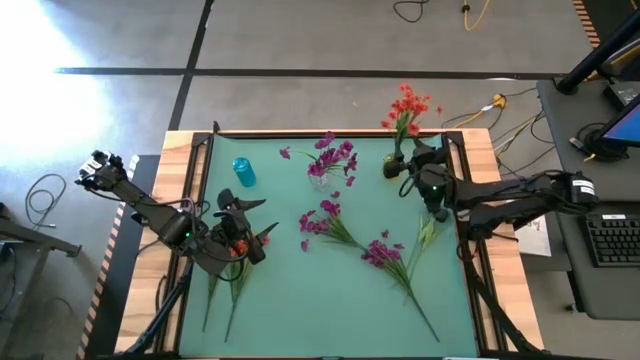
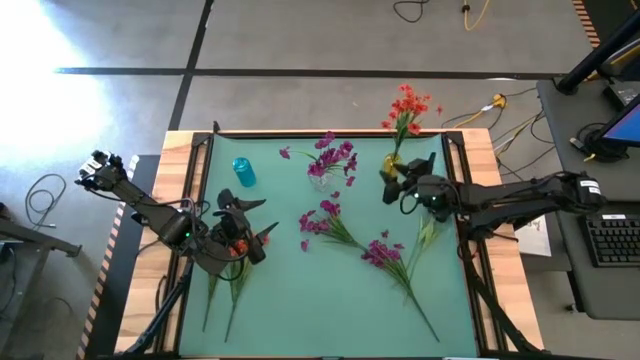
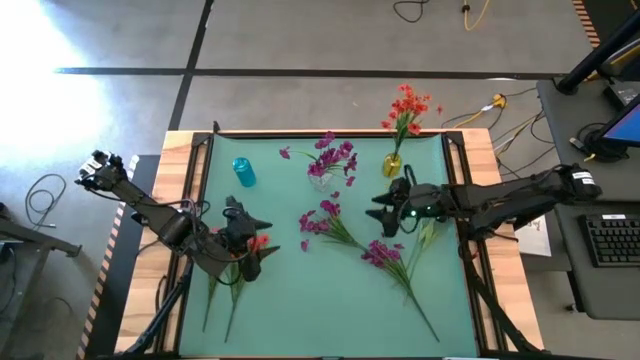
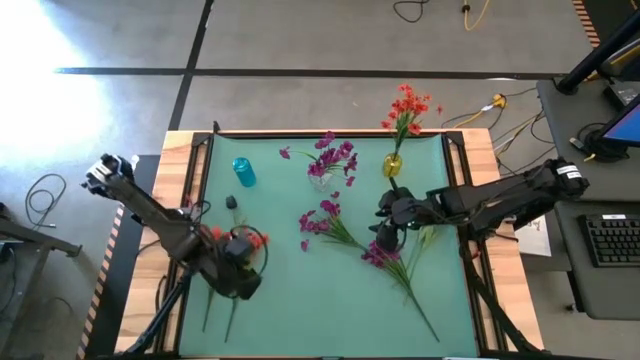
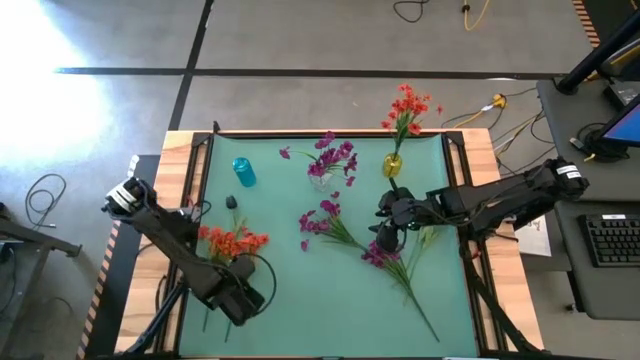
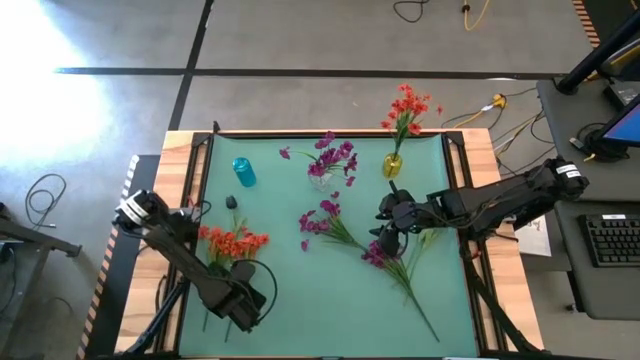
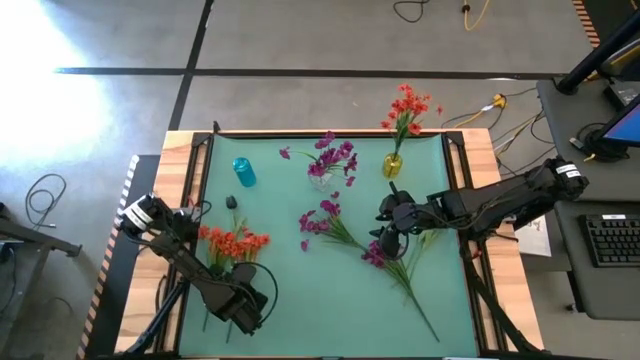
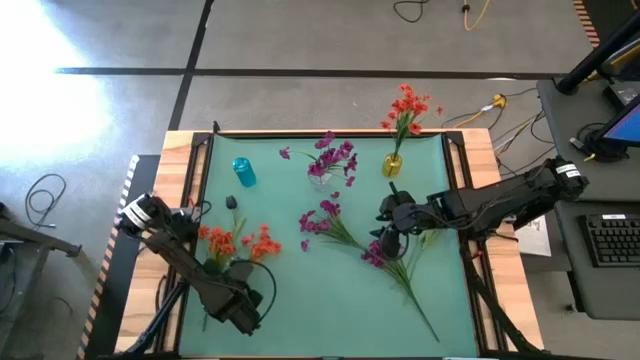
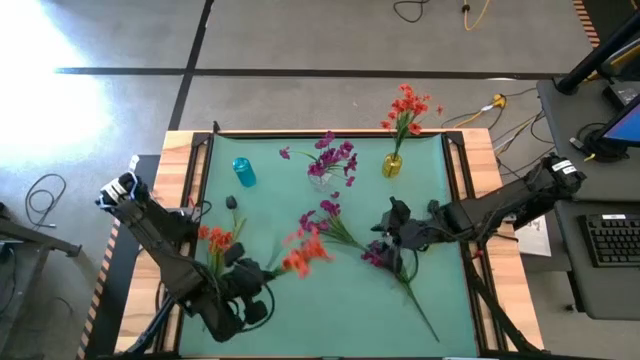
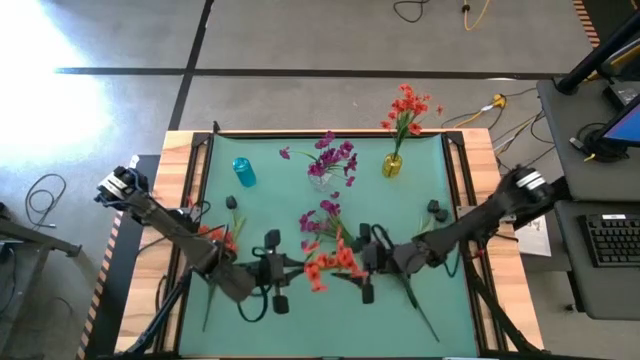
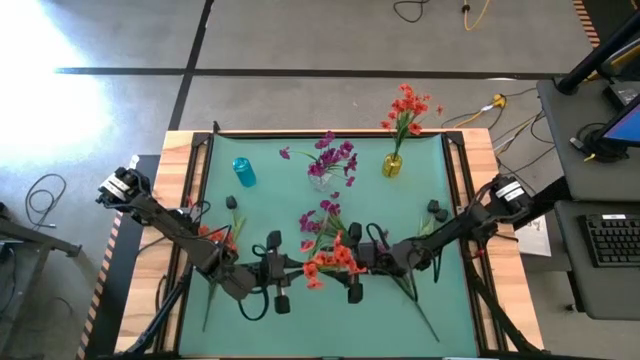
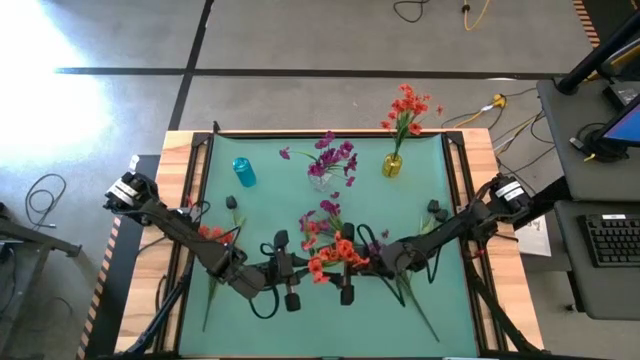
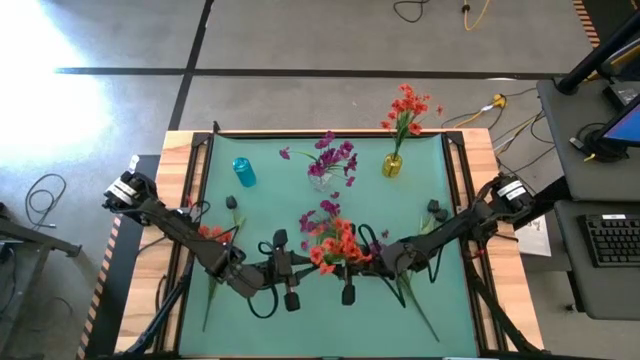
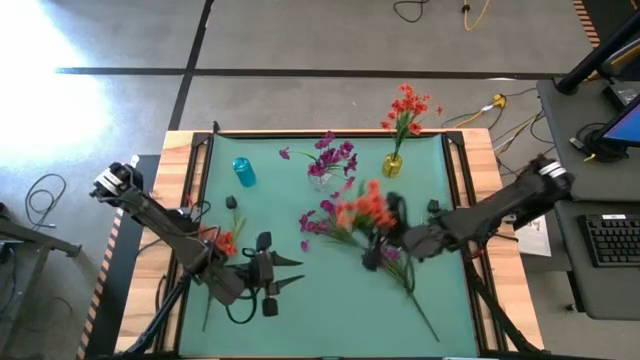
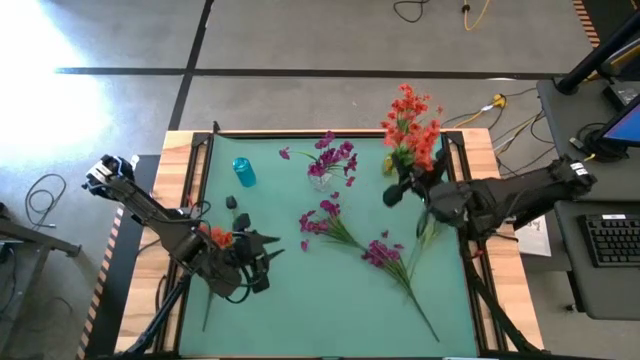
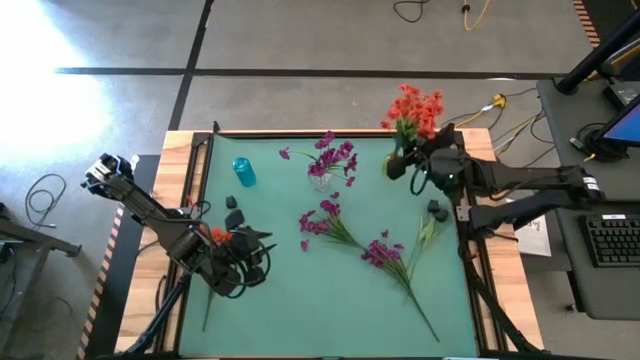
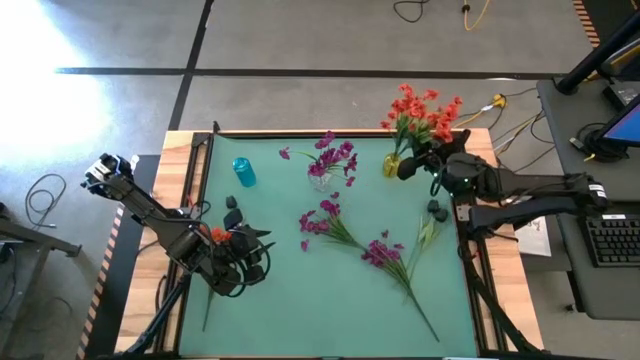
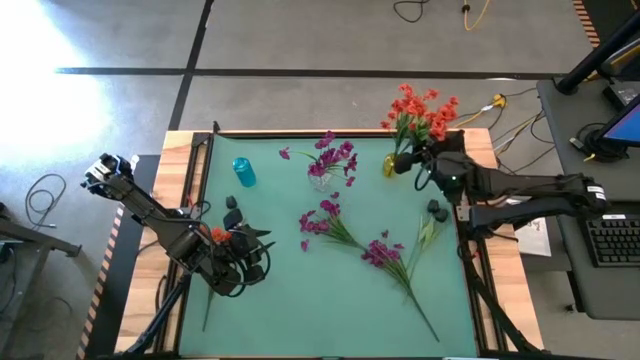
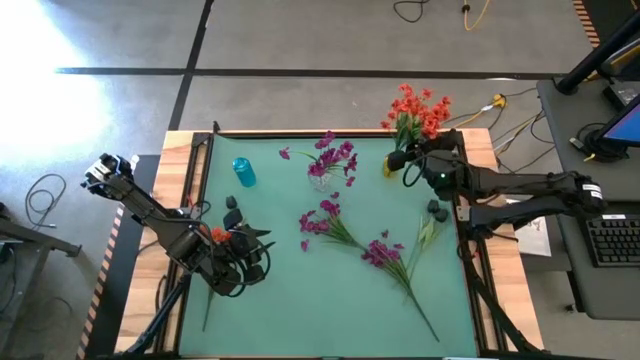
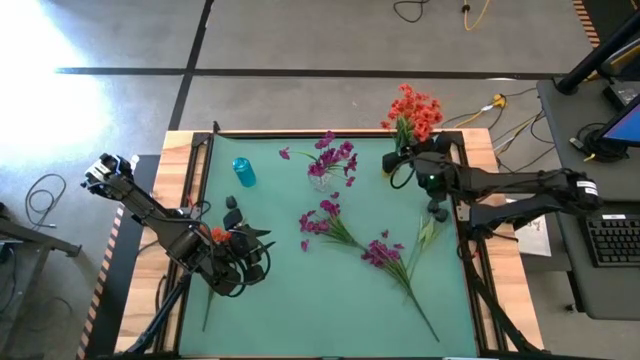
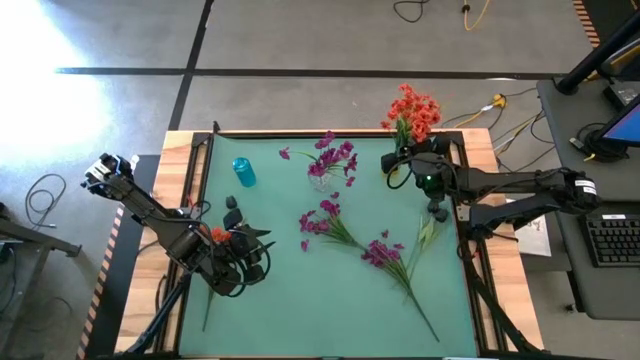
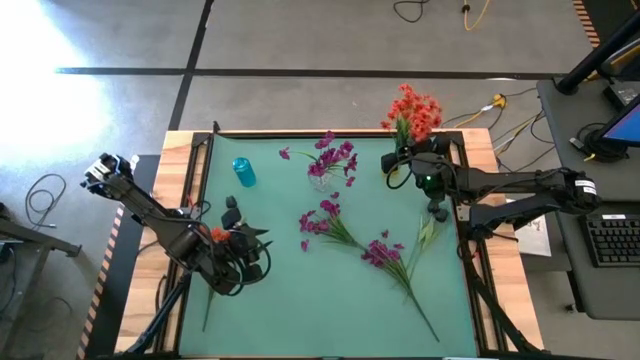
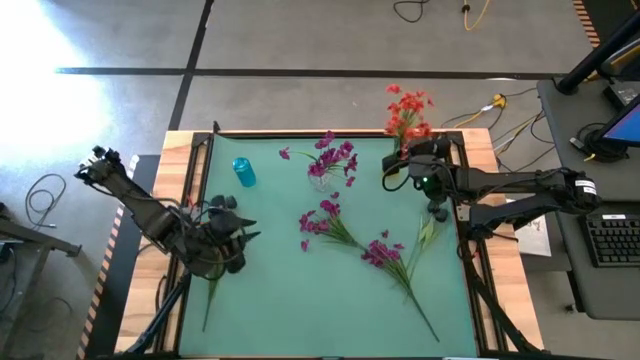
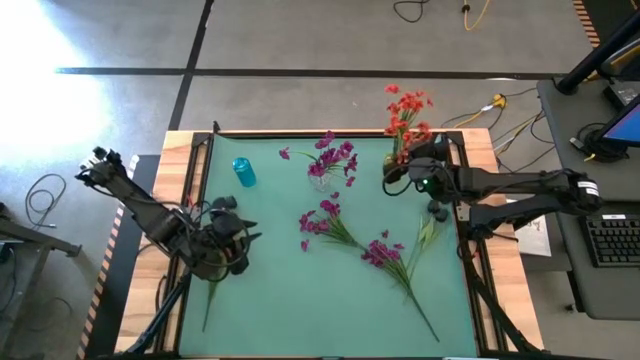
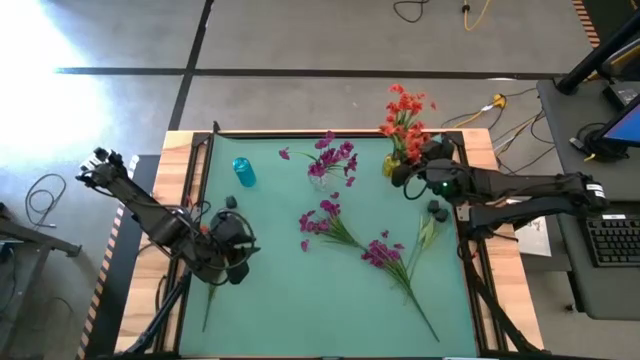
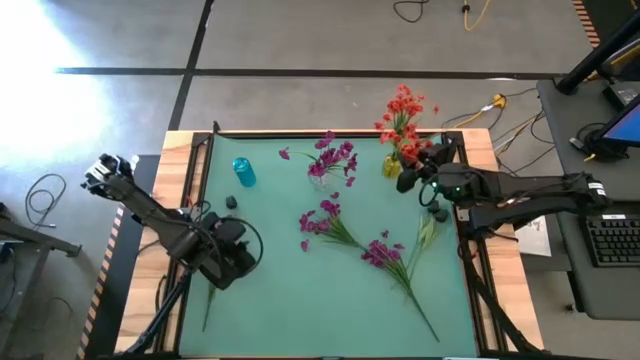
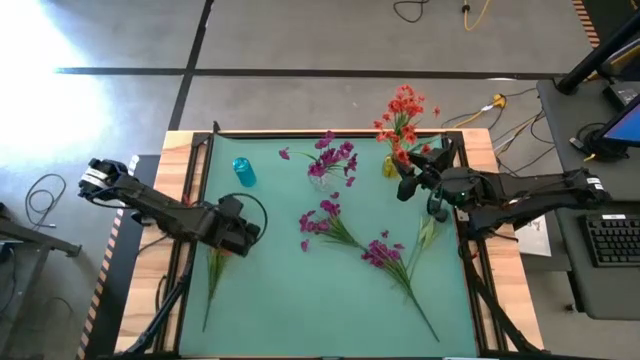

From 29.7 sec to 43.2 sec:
Task: Sort flowers into vase by color
Put the right orange flowers into the yellow flower vase

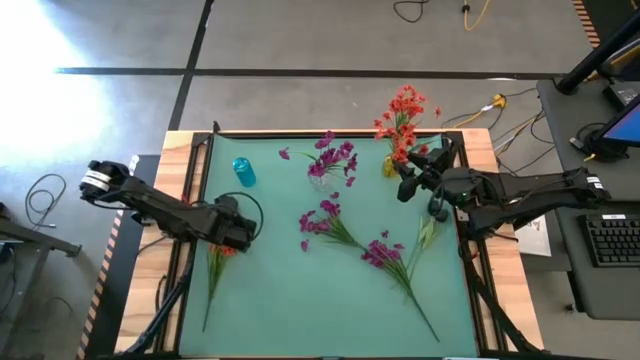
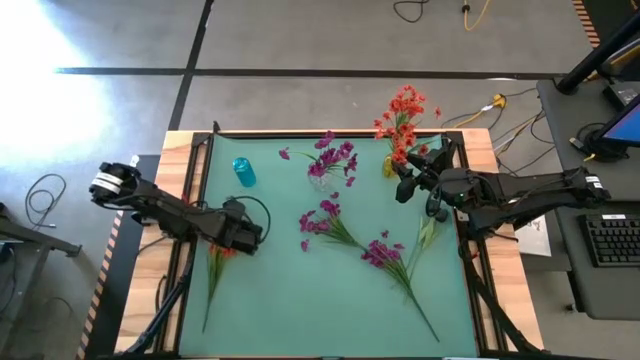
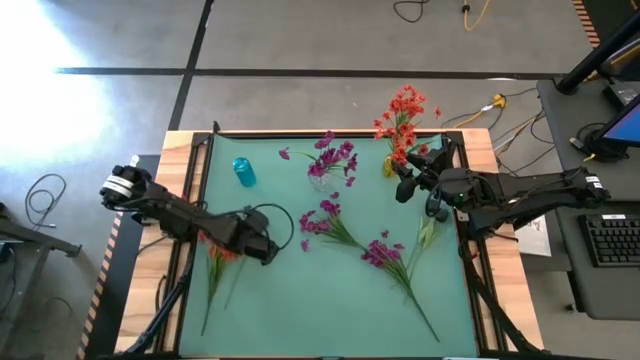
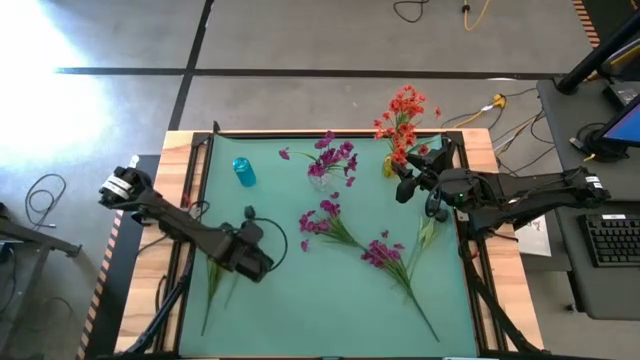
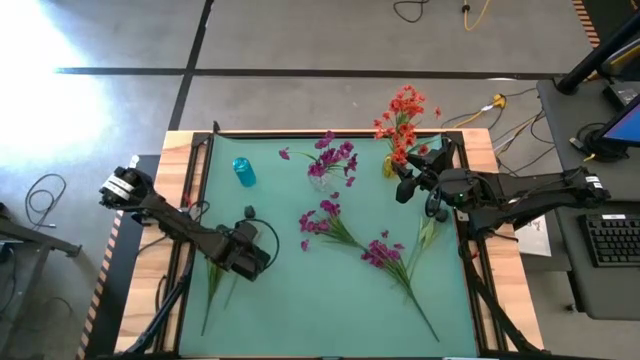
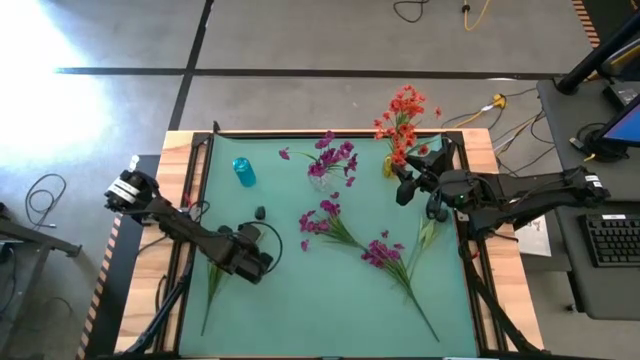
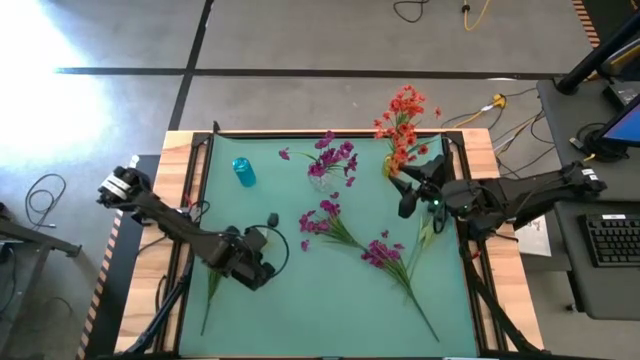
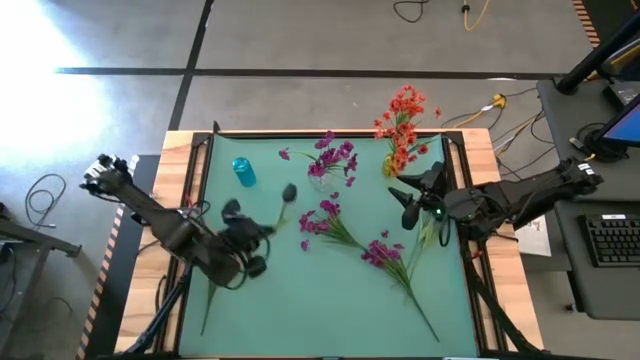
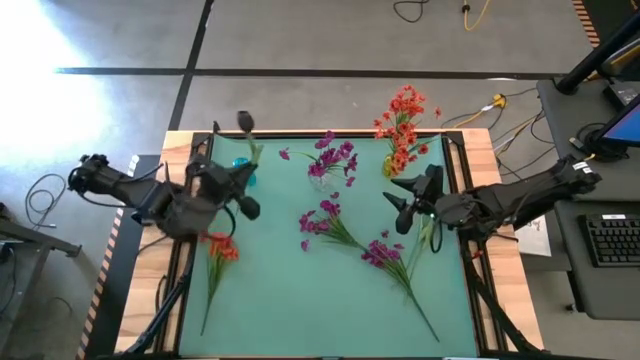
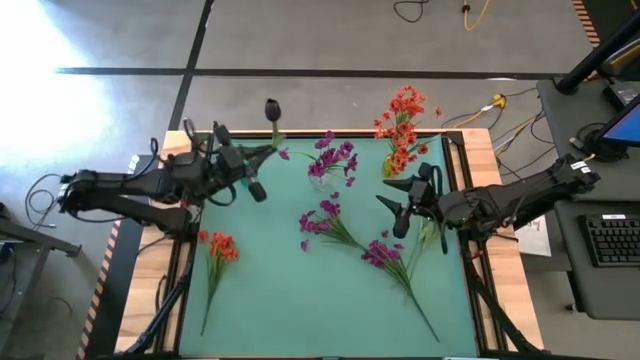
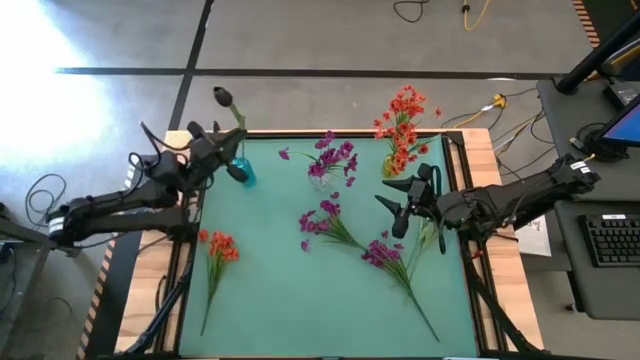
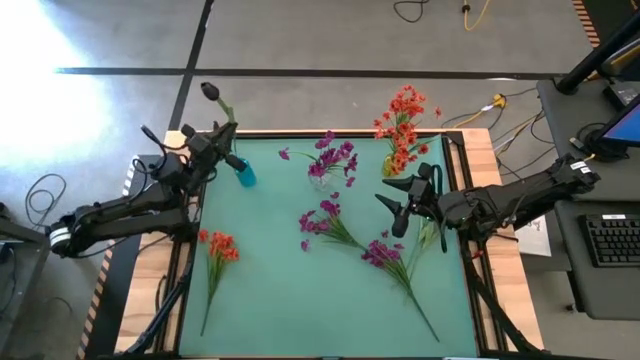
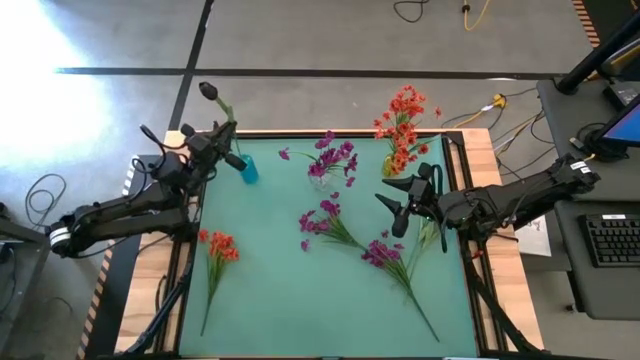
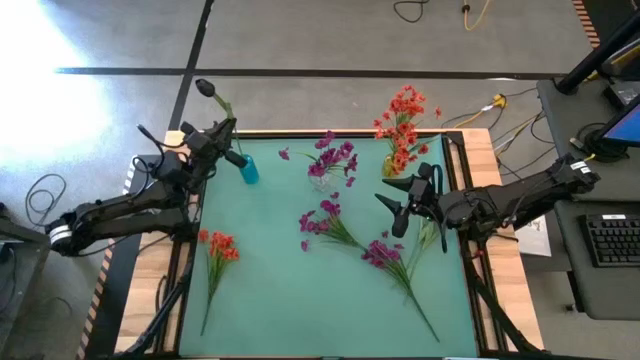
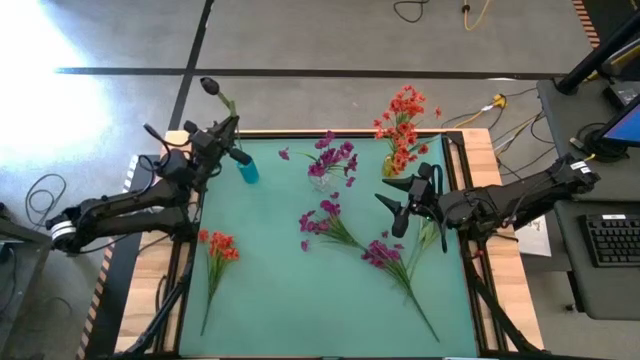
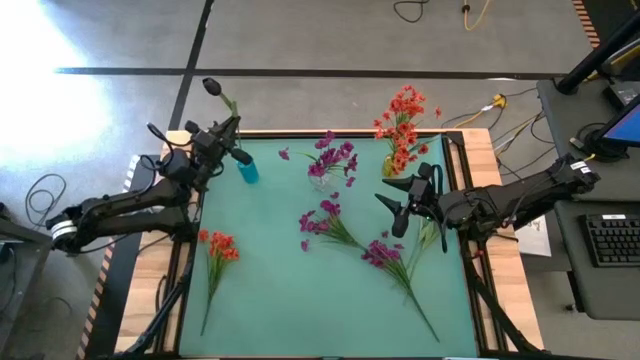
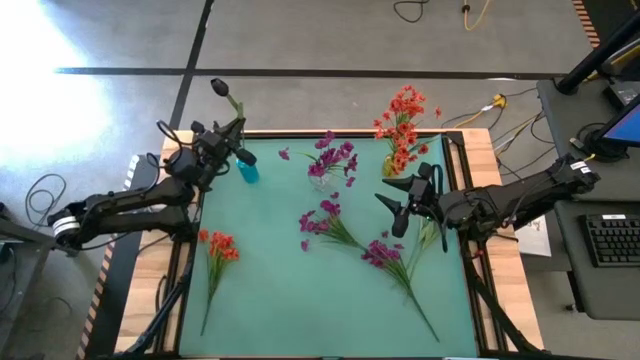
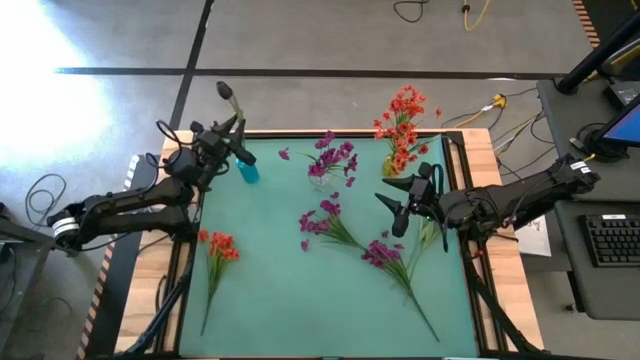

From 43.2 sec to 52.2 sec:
Put the left black flower into the blue flower vase
